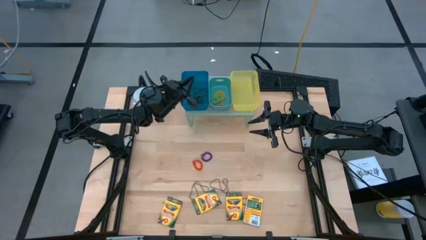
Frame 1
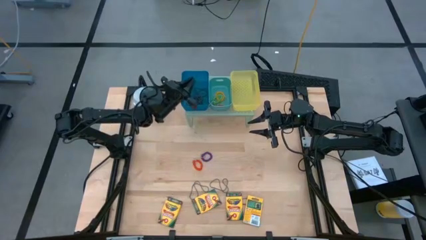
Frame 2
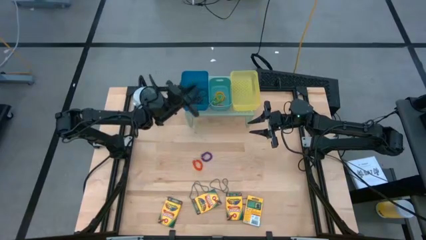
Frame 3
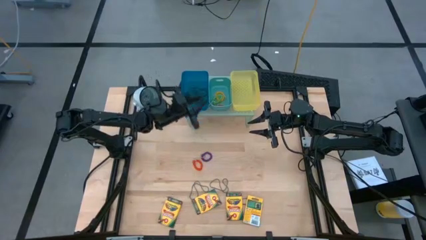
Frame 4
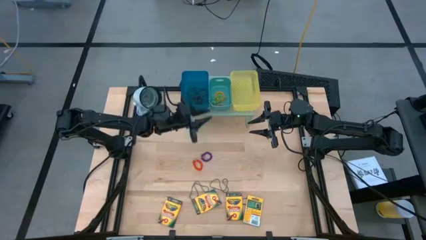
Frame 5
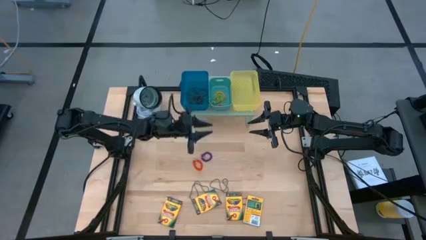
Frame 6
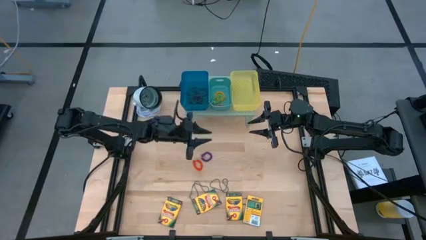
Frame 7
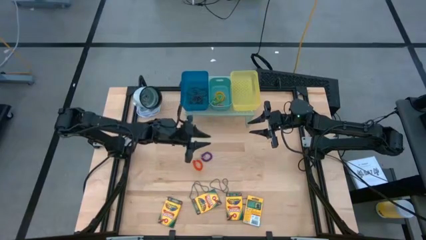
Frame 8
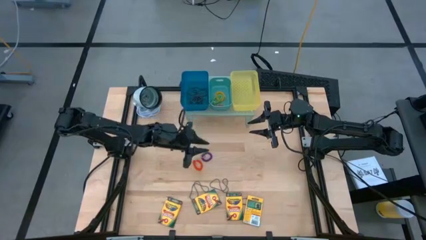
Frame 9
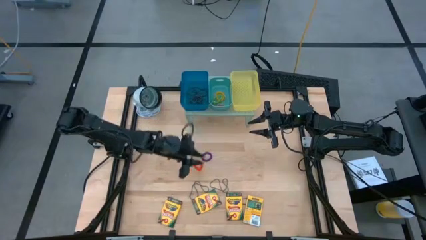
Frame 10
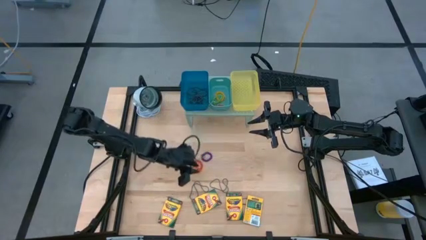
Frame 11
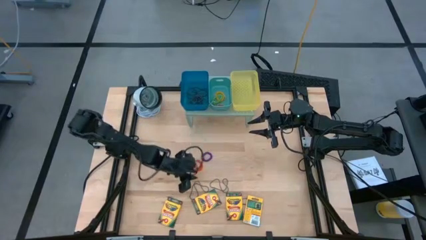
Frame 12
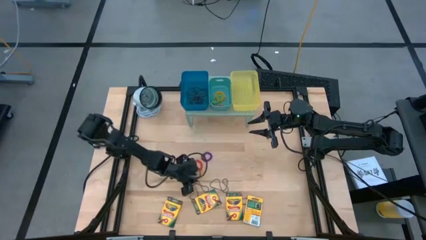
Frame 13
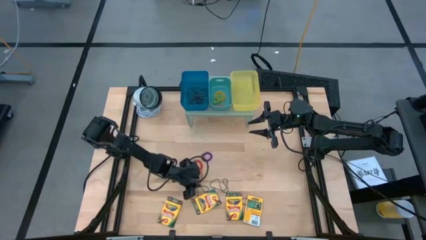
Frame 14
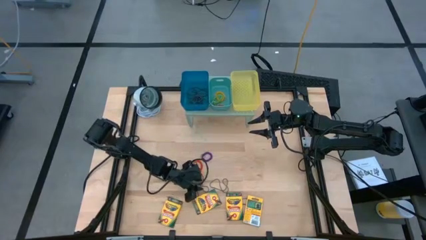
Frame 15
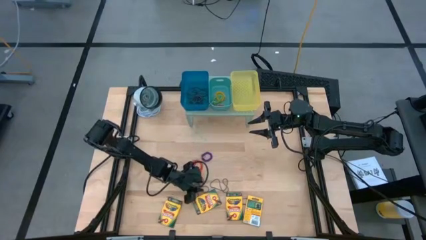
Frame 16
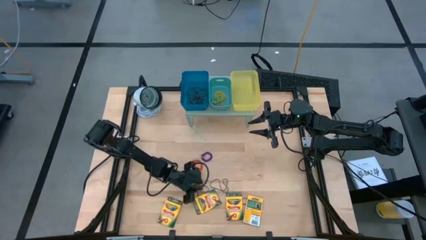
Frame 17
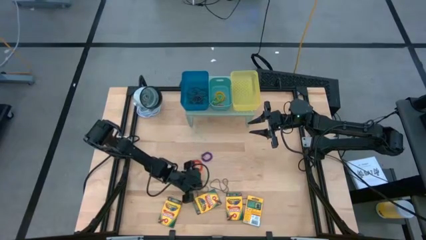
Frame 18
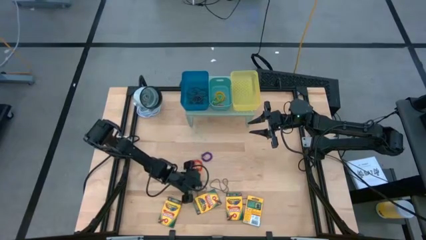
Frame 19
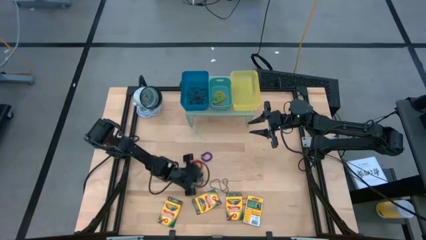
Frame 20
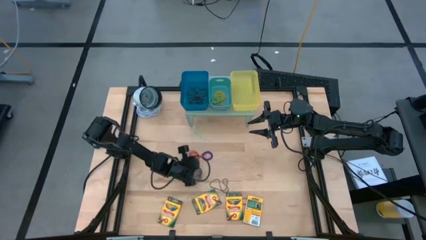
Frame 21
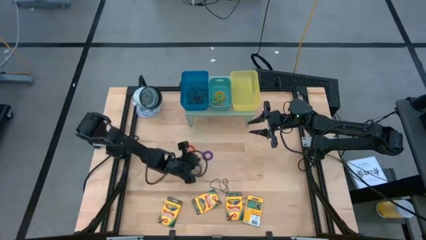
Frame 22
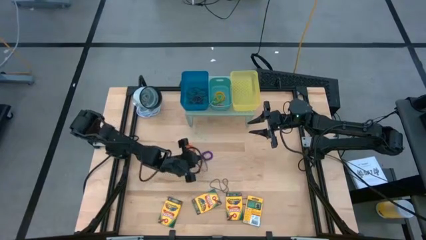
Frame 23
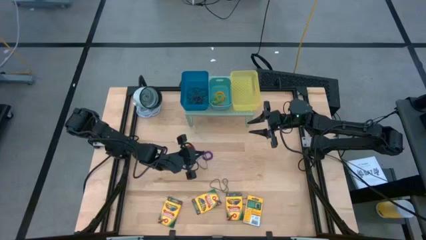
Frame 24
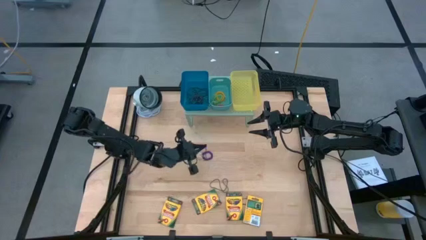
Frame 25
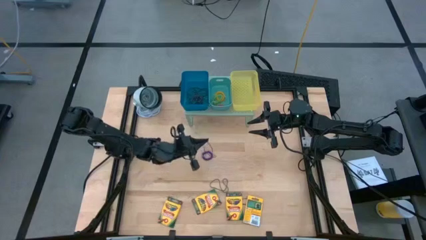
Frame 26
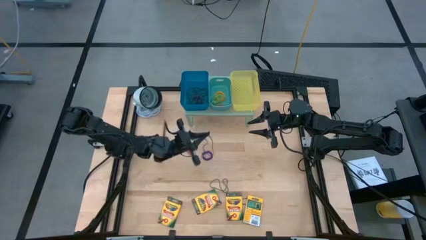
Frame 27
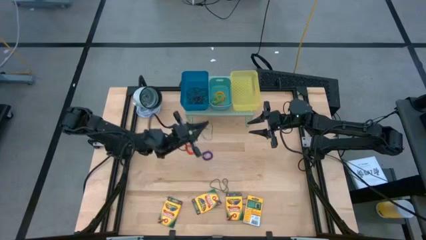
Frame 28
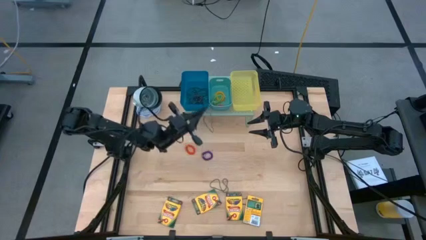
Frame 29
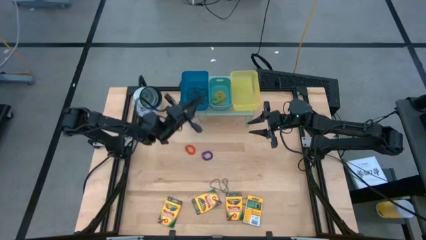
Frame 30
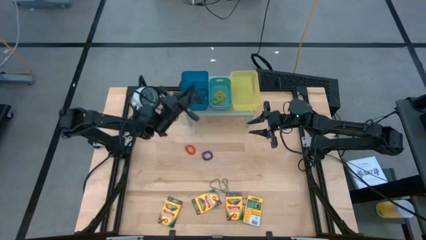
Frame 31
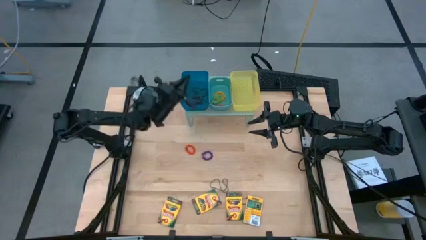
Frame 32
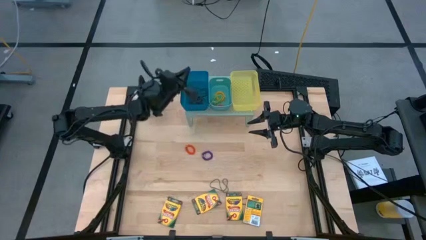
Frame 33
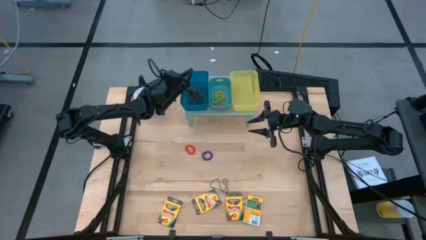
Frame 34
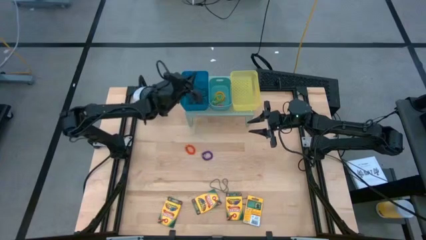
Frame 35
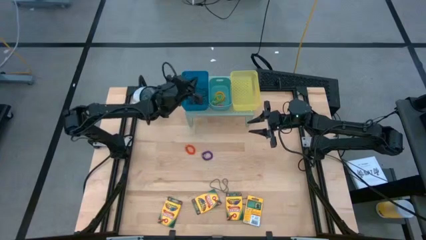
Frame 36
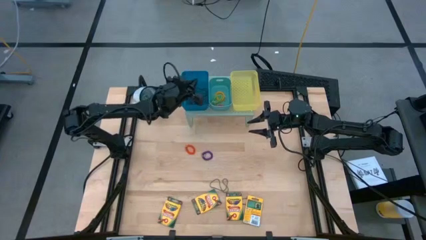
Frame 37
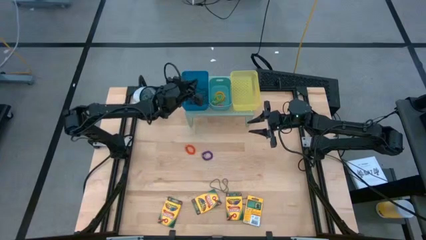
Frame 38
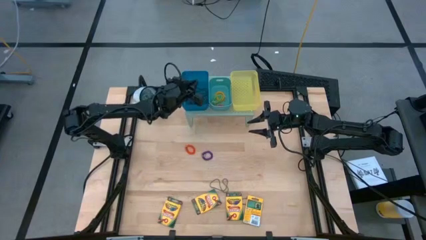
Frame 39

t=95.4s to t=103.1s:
Task: Pick & Place Office Desk Supplies
Put the purple rubber band into the blue bin on the shelf

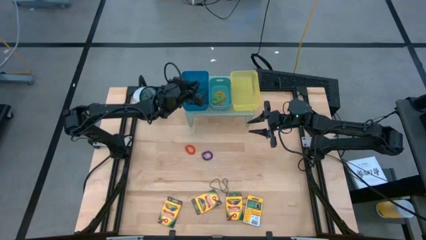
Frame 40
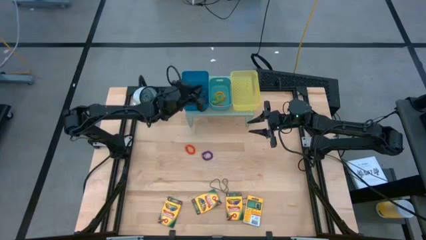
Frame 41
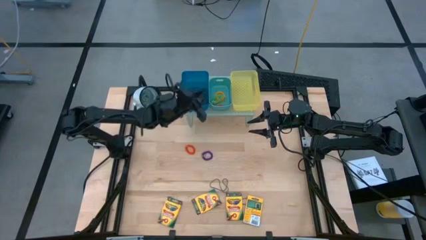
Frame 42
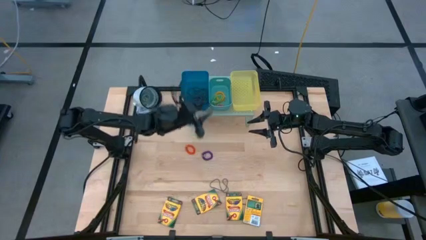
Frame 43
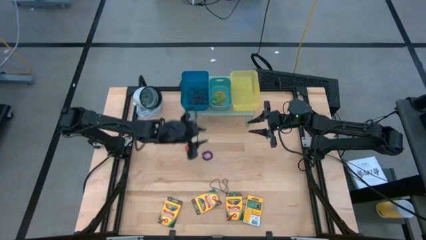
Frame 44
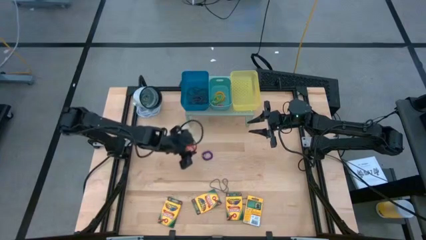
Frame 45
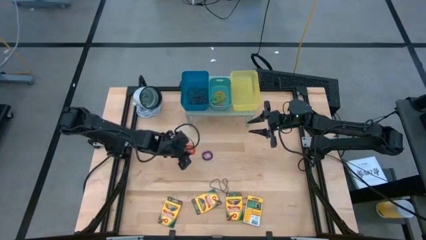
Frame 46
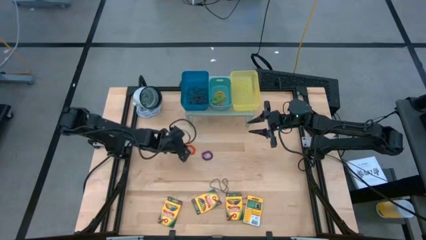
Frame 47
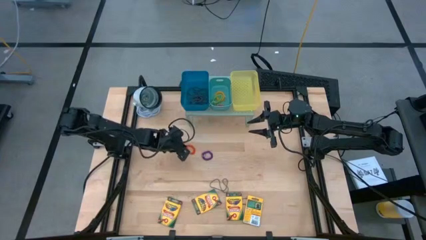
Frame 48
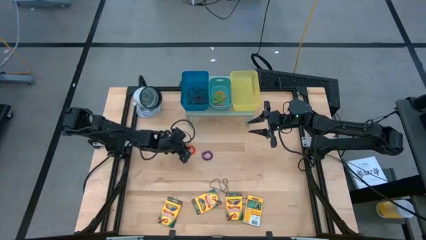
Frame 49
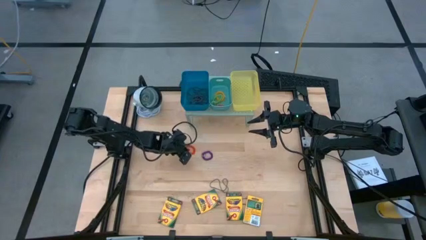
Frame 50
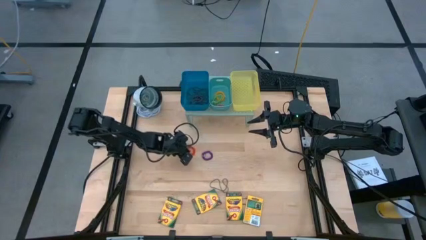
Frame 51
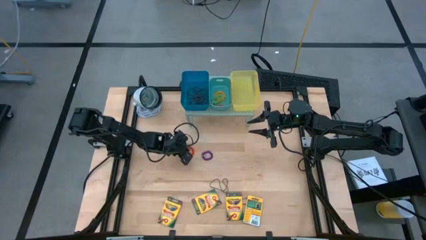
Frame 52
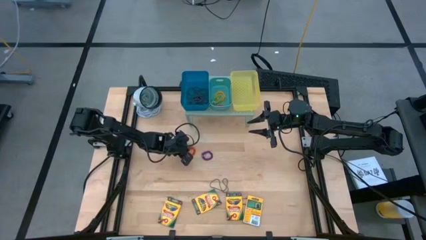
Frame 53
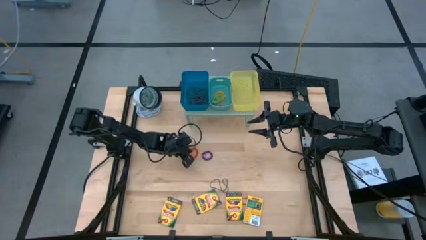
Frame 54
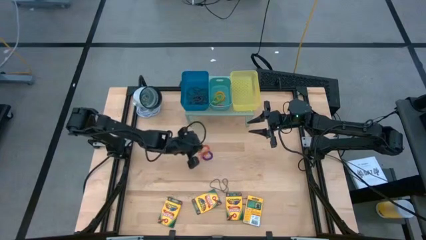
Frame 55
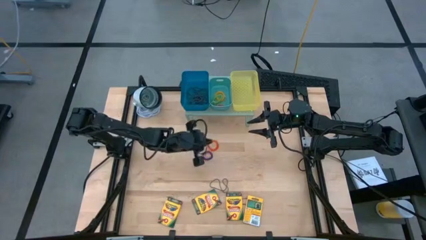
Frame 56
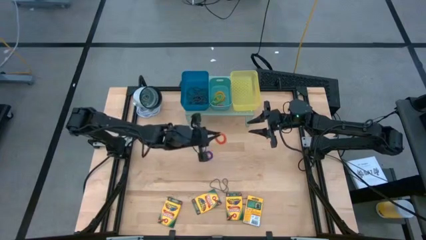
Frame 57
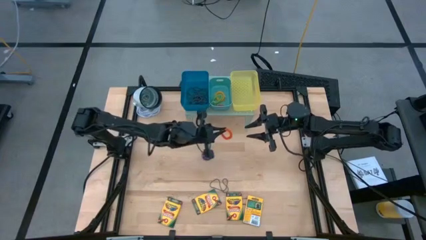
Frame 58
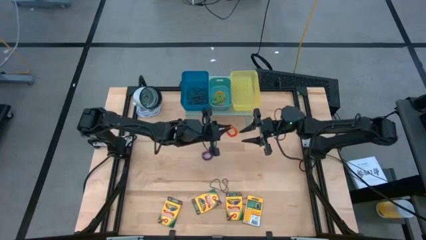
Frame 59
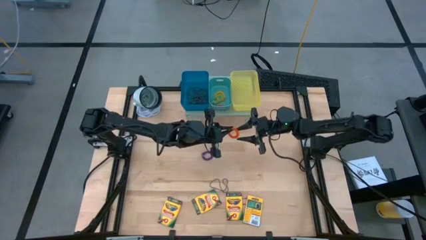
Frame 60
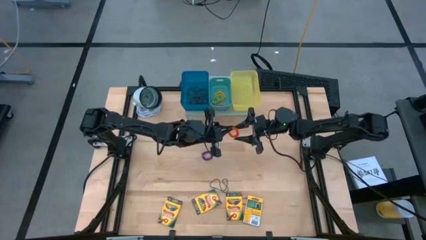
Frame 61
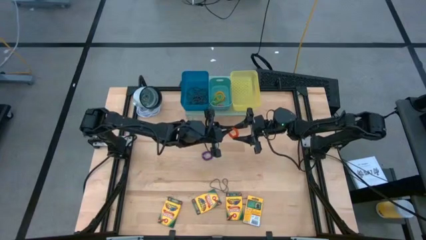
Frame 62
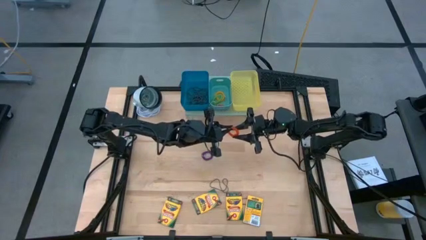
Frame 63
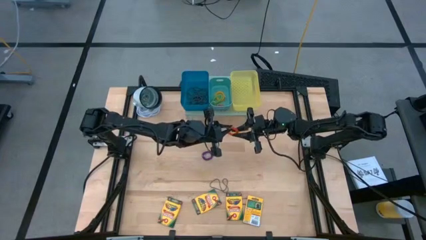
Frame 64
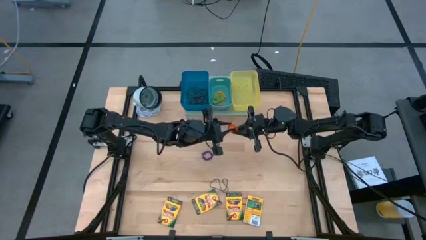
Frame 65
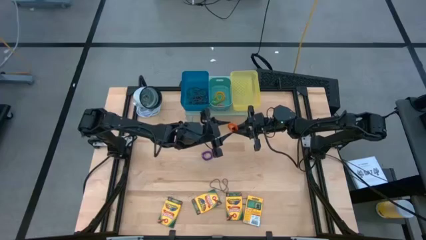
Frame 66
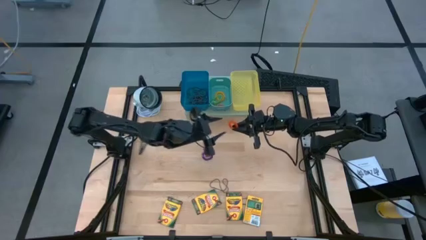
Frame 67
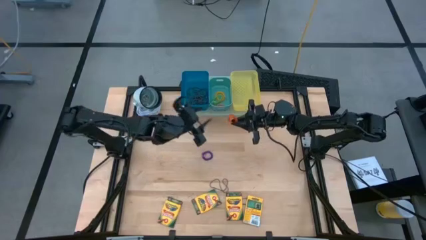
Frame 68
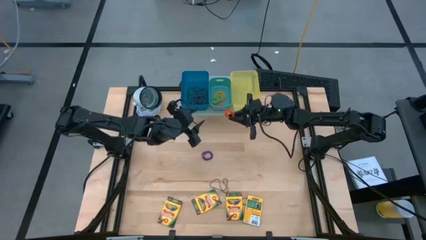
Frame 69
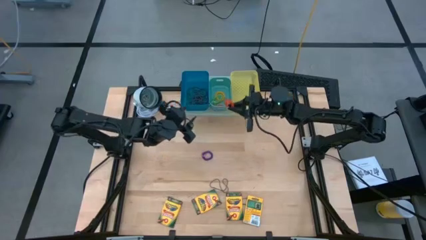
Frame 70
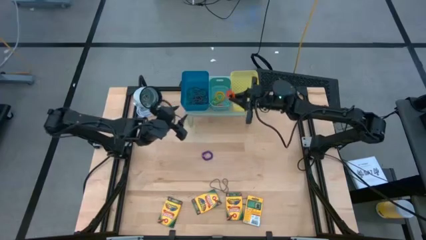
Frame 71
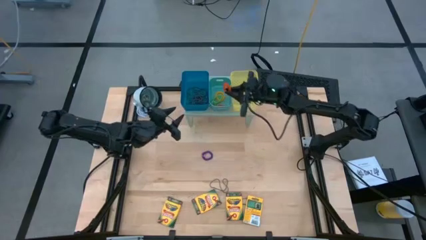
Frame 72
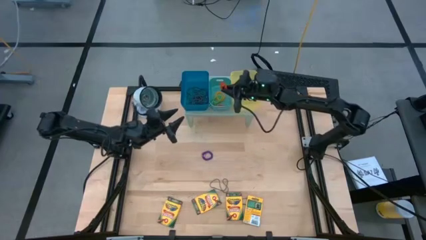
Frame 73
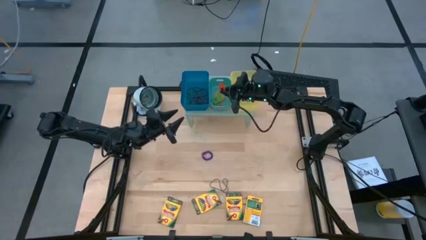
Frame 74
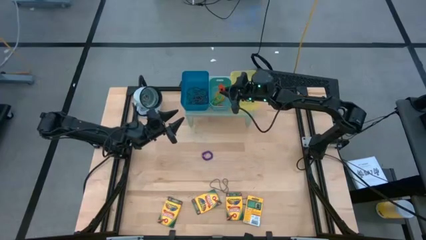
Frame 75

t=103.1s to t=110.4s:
Put the orange spring keychain into the green bin on the shelf

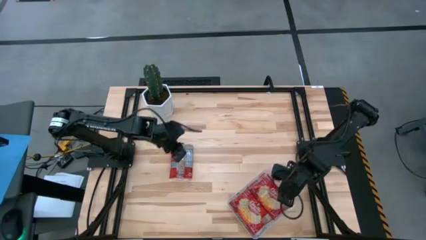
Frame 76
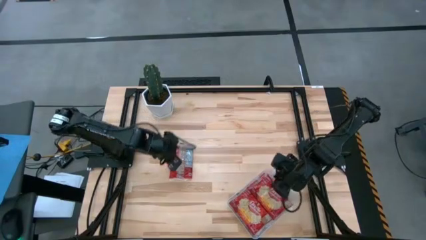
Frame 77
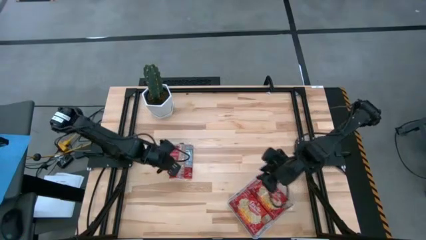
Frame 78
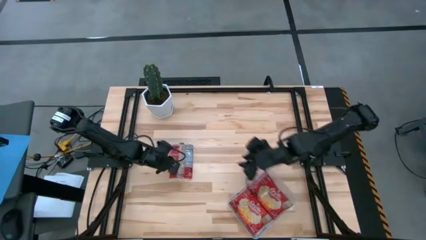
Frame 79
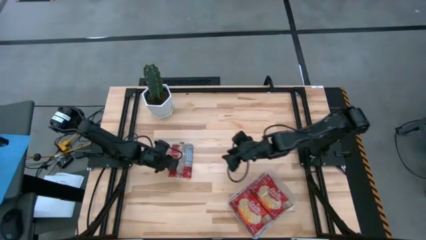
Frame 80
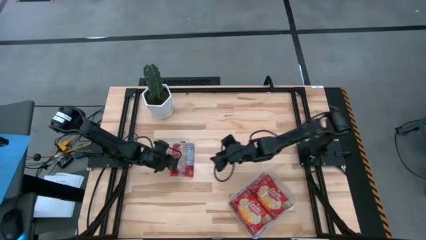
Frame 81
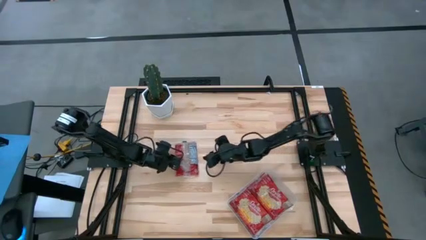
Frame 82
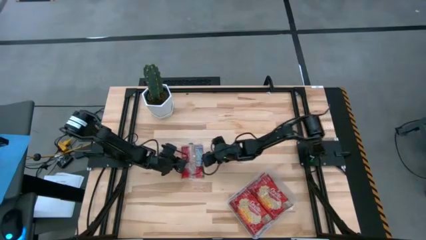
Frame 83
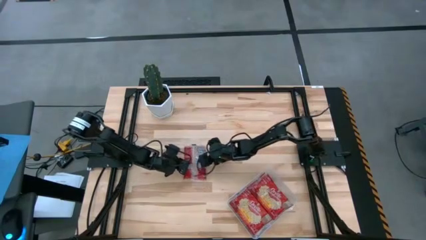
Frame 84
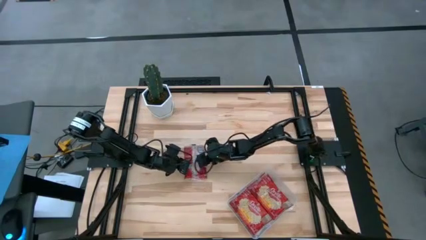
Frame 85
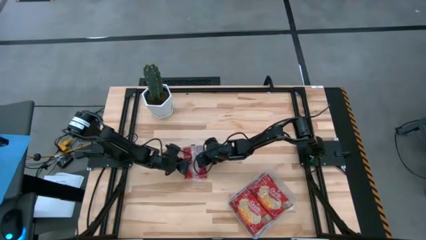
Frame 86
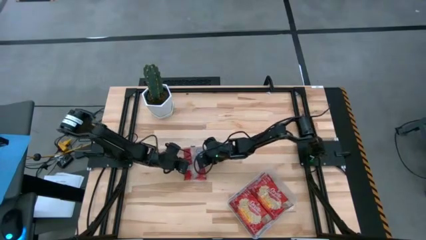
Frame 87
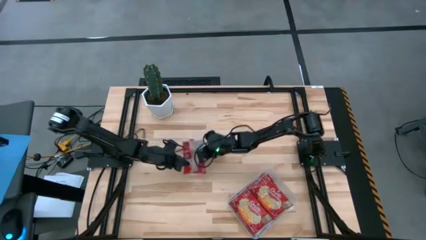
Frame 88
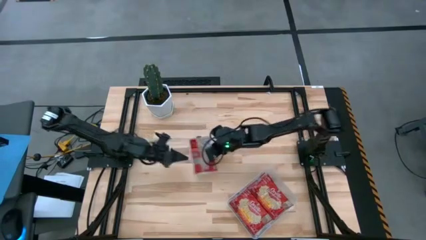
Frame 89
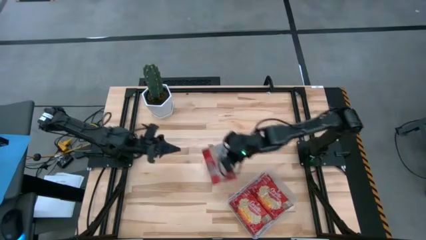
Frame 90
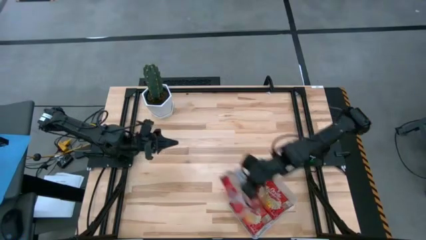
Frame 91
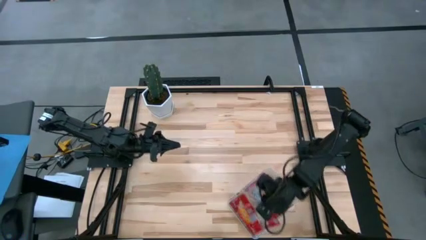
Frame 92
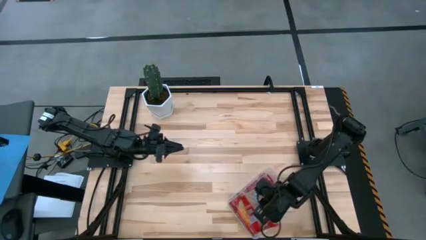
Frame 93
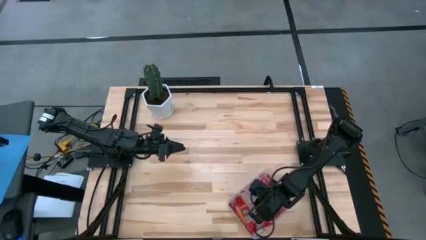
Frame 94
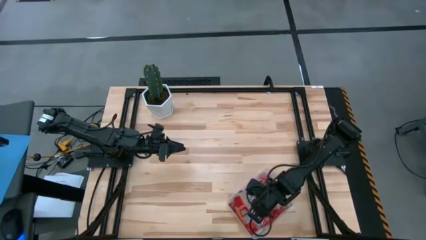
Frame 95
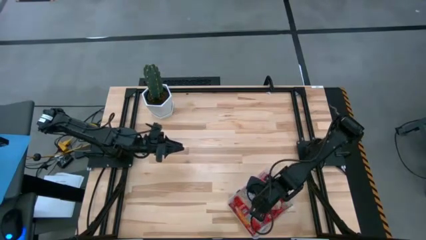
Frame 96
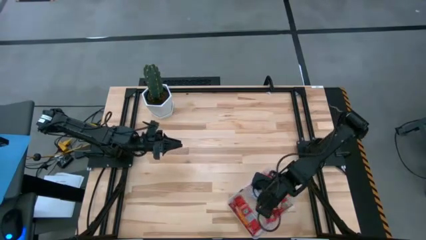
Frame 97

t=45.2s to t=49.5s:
Task: Sort popcorn bags into baskets
Put the red popcorn bag into the transparent container
